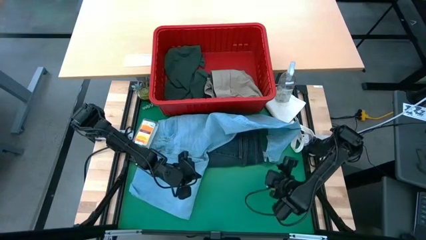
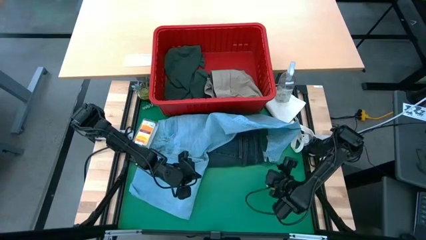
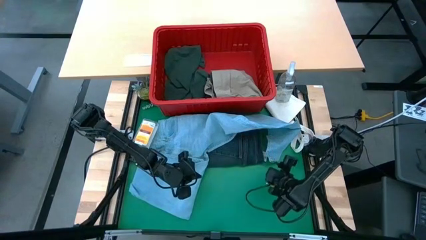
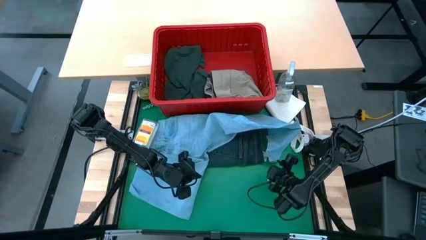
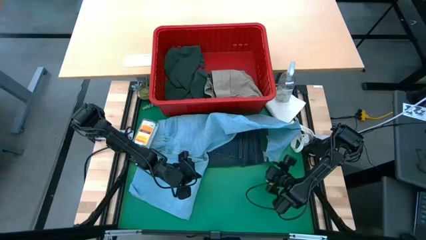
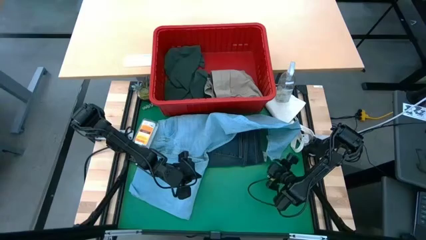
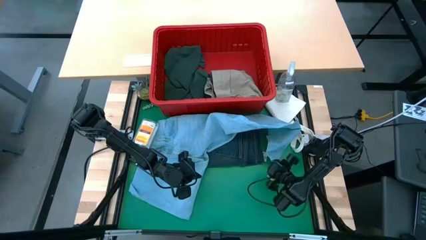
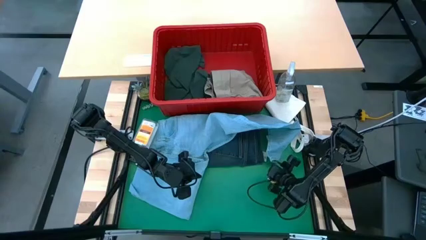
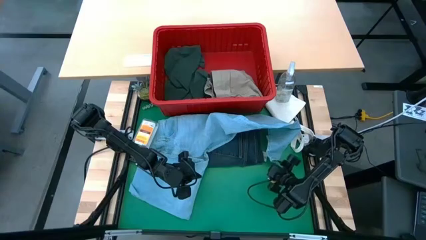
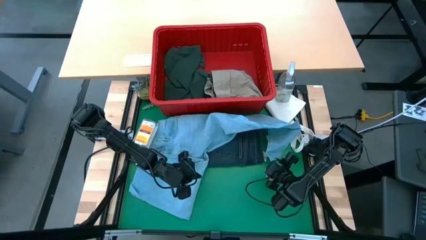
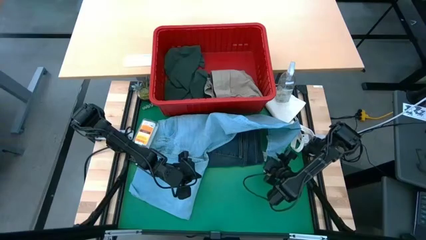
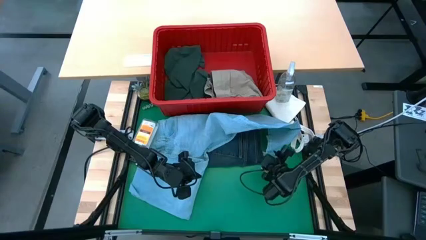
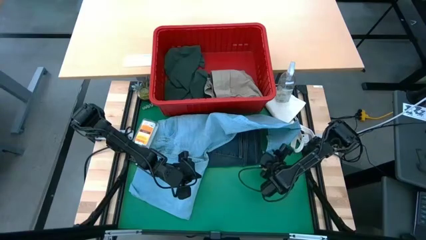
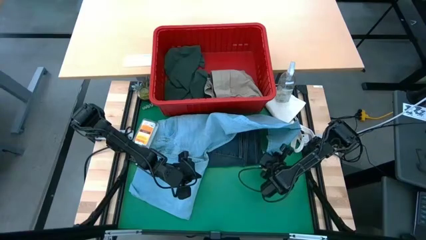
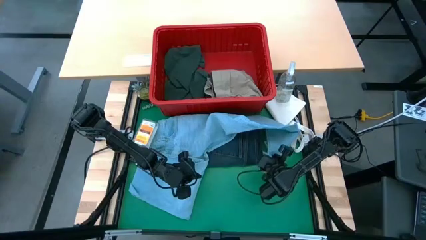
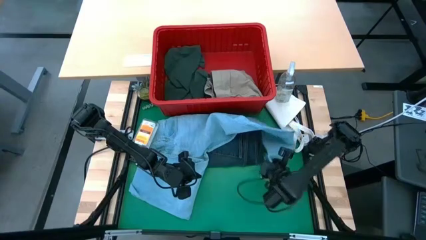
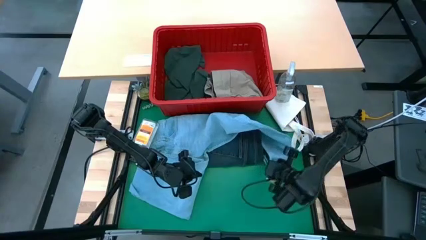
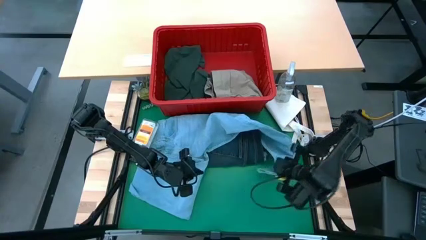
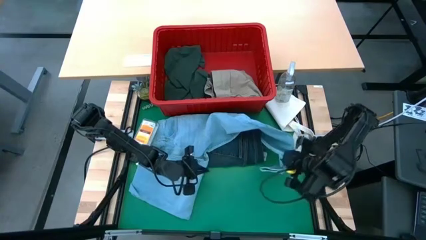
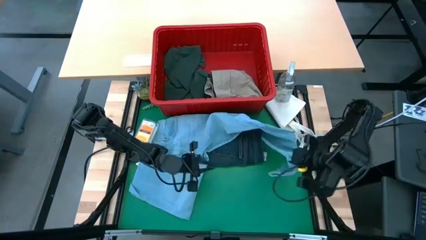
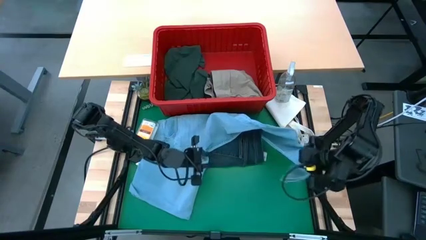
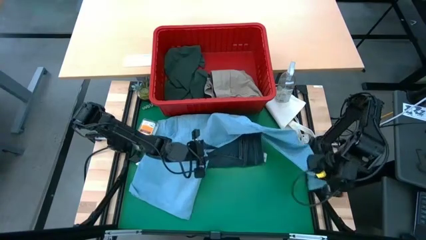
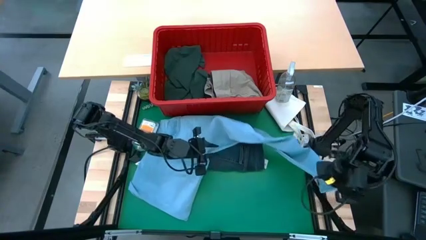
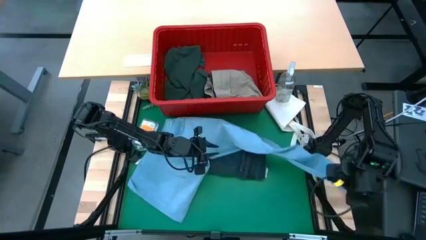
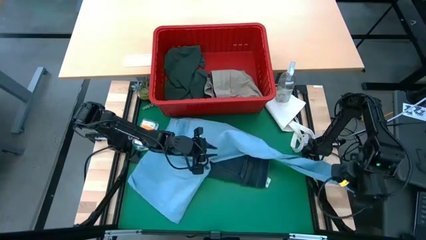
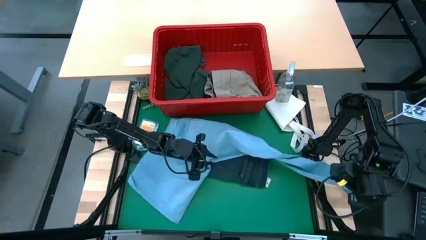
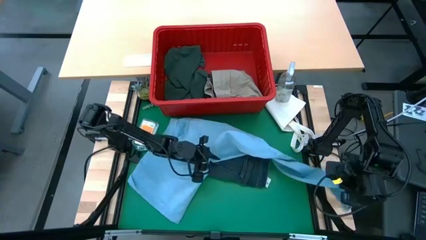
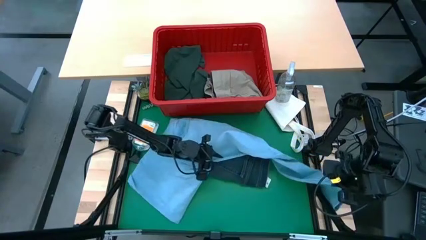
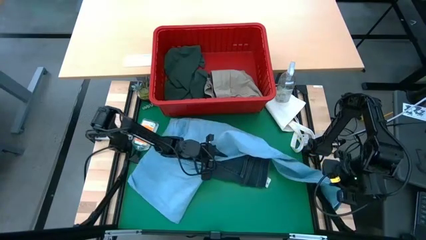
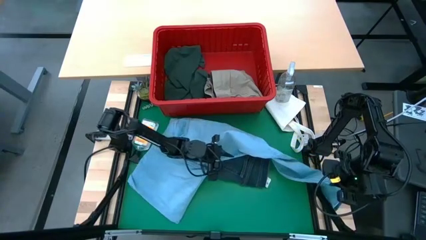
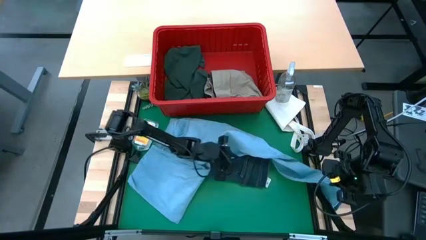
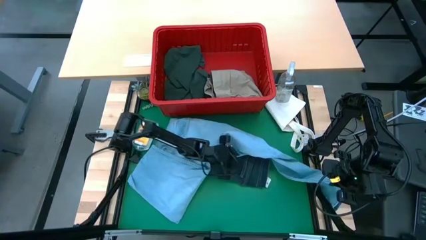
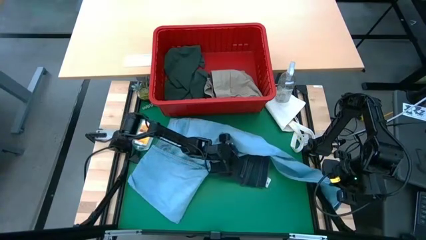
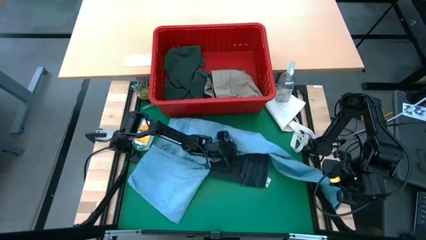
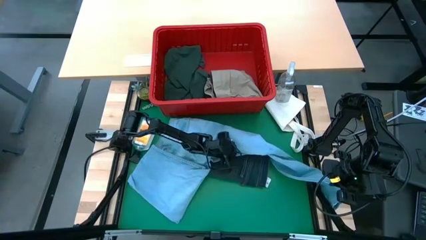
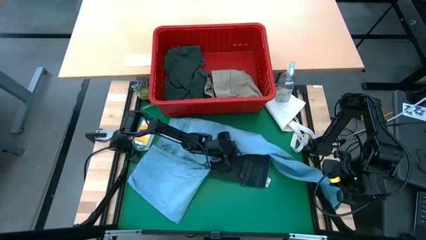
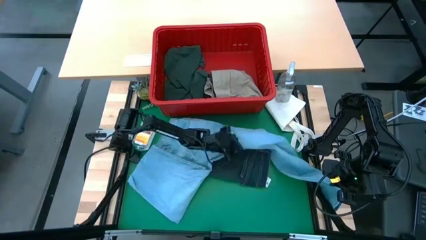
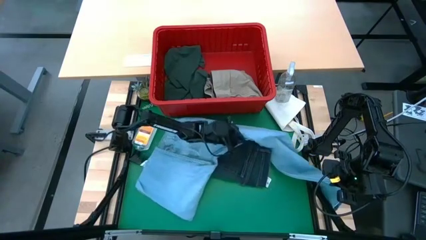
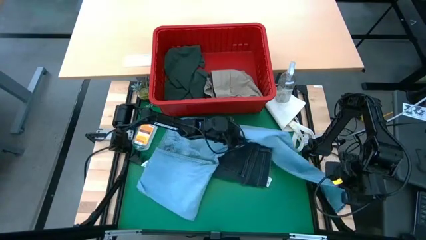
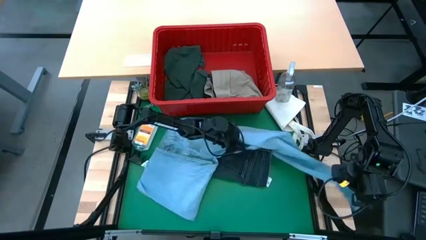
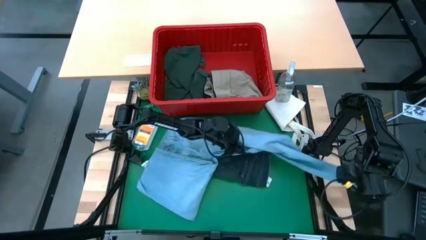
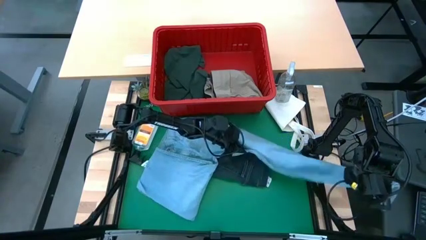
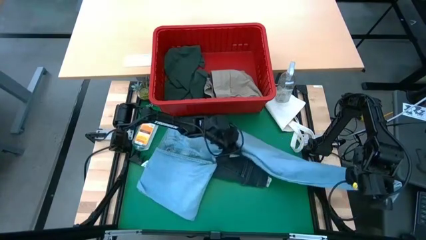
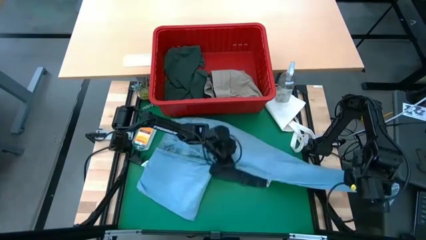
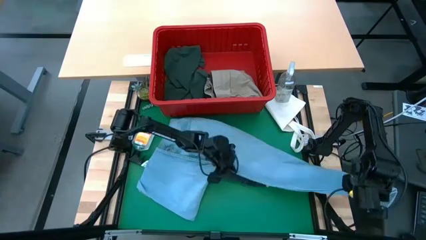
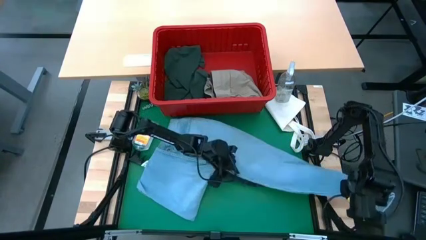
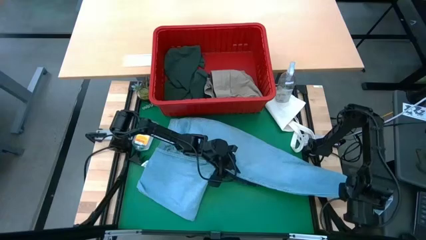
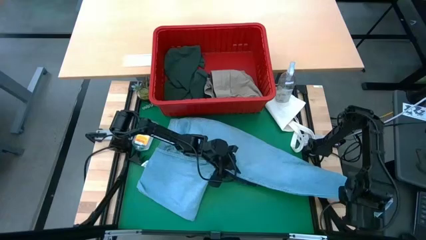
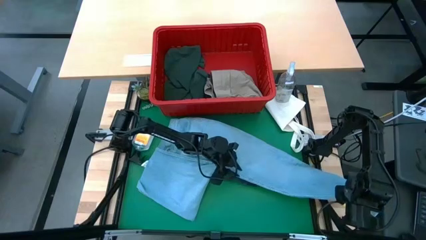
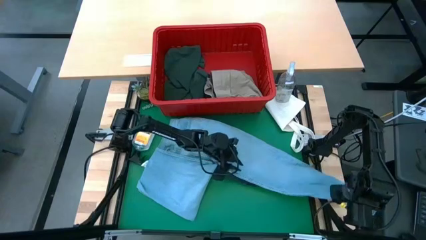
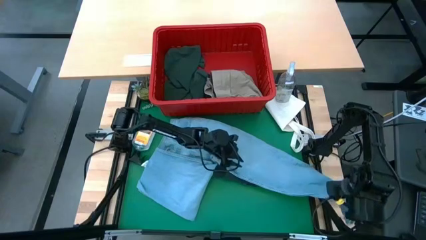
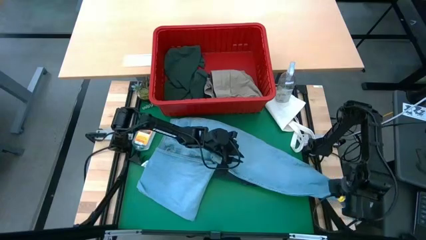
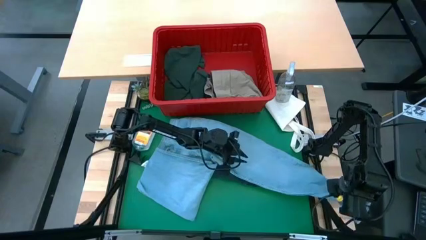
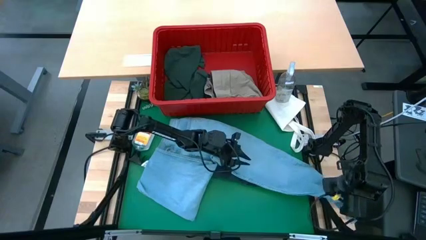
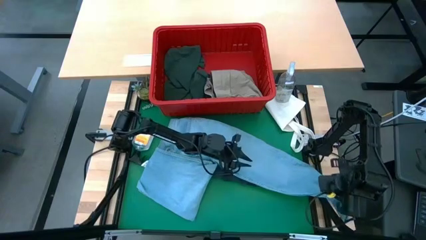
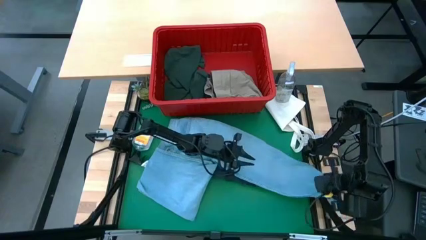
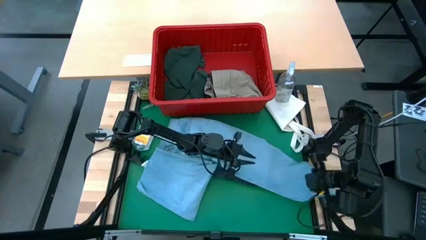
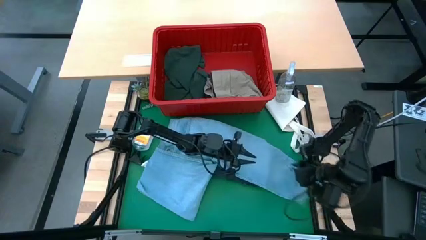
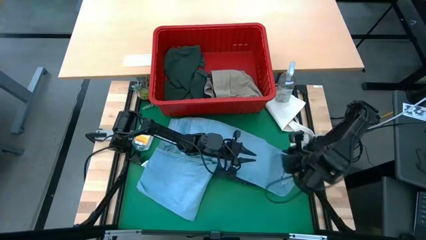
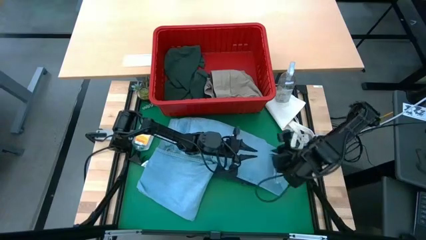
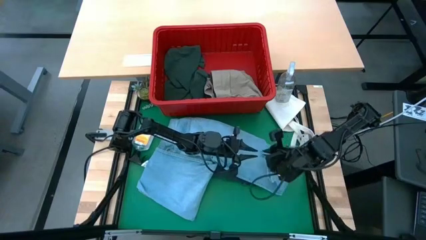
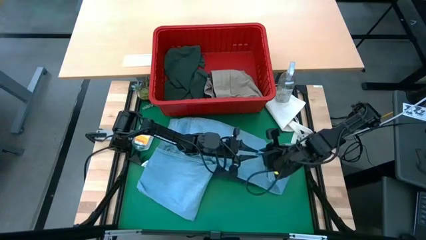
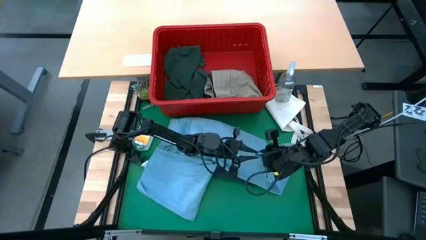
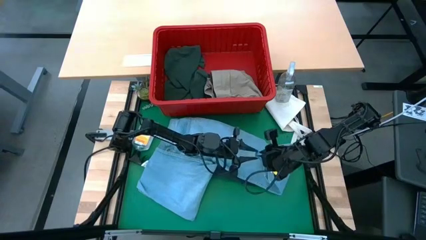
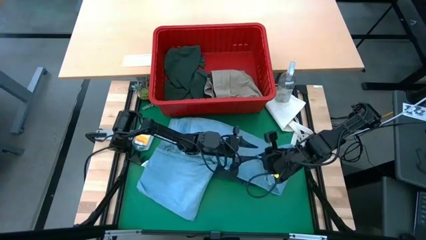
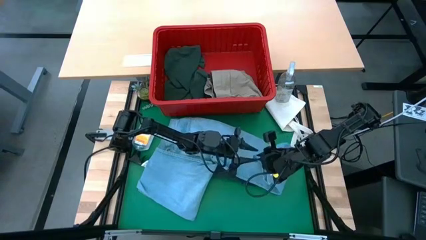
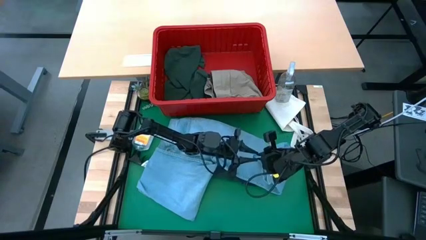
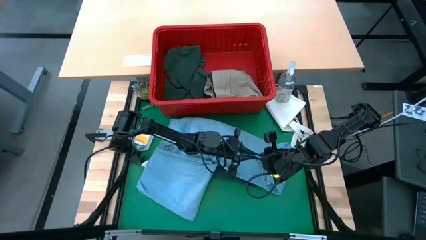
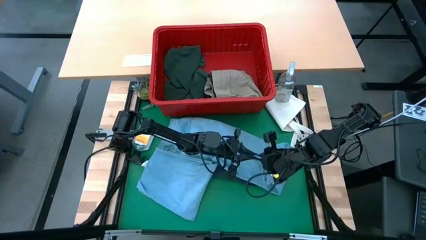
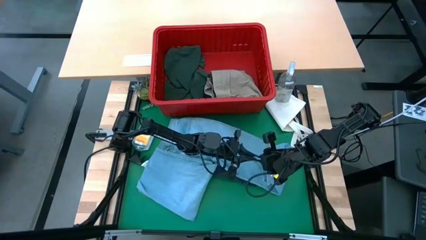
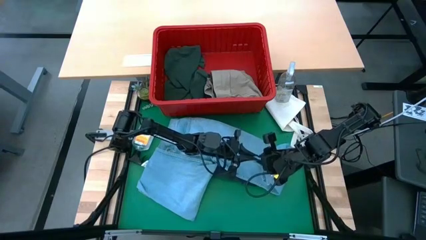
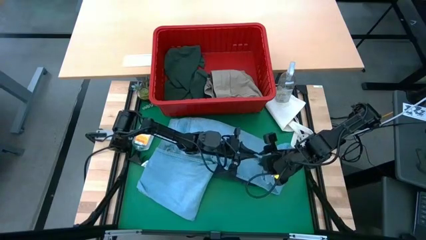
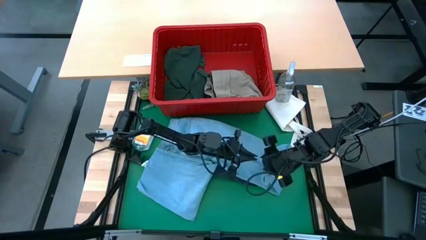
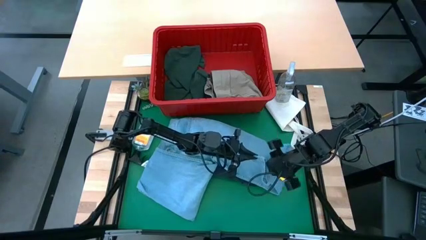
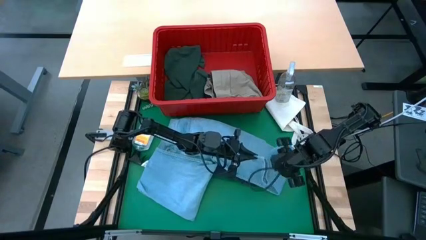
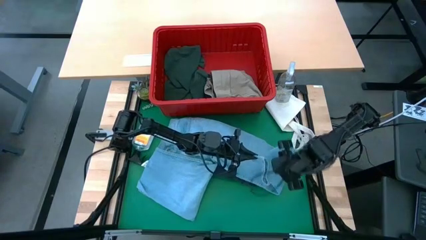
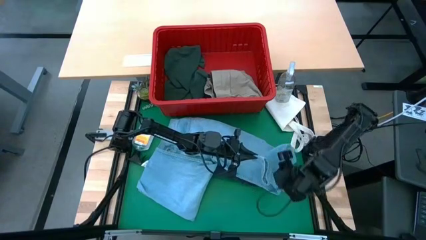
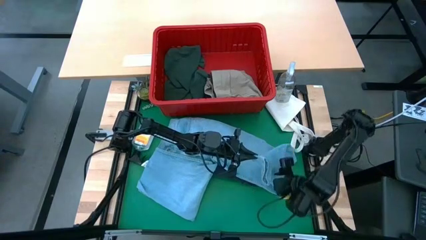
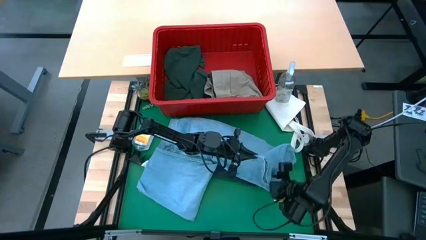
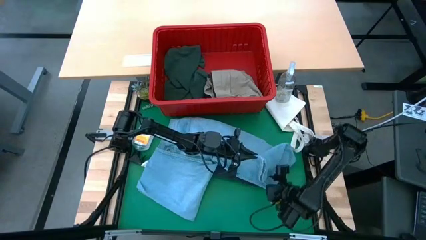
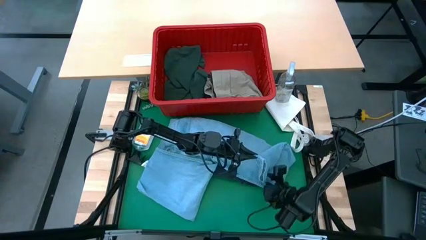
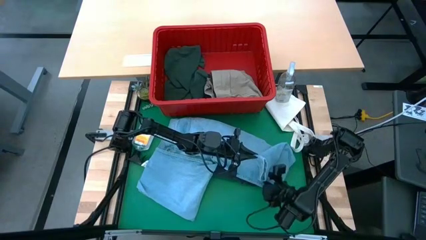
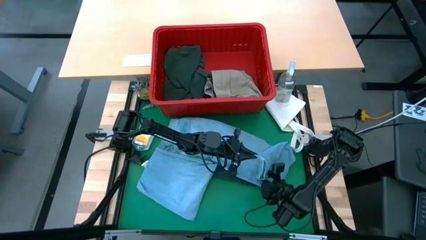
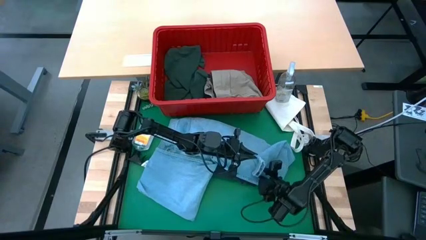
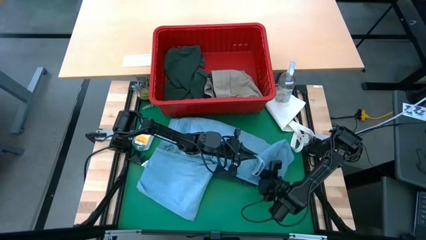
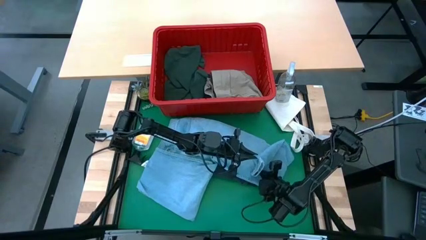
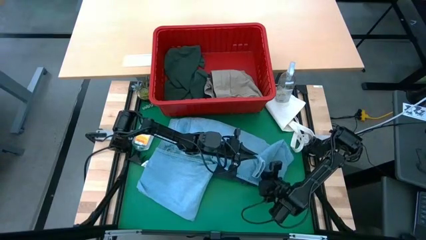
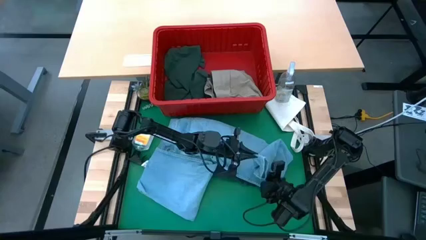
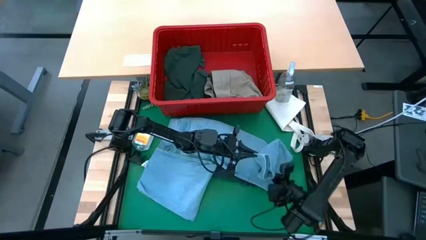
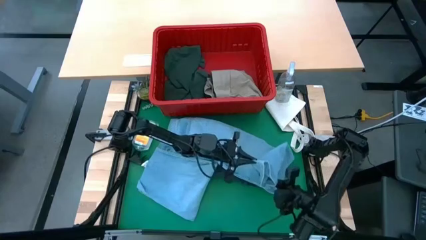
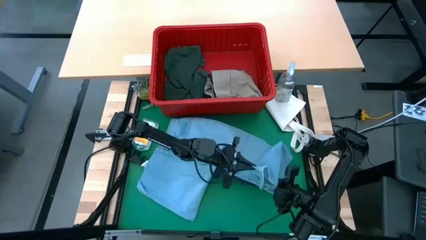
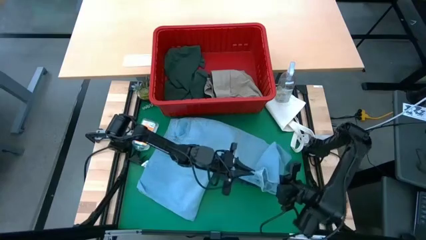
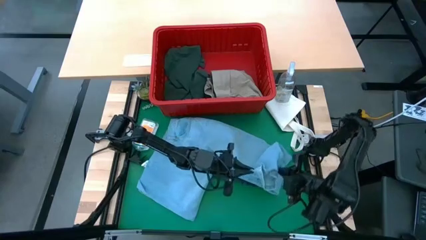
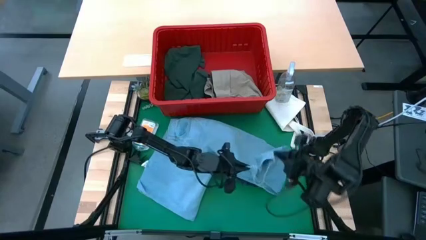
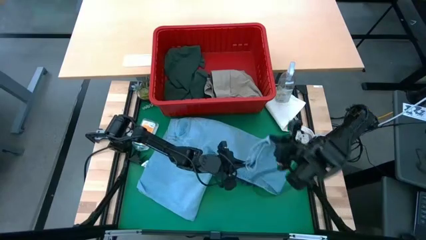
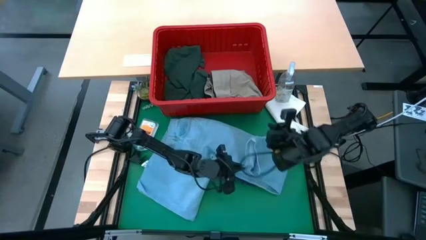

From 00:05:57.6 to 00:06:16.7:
Task: Fold laundry
Fold the light blue jeans
